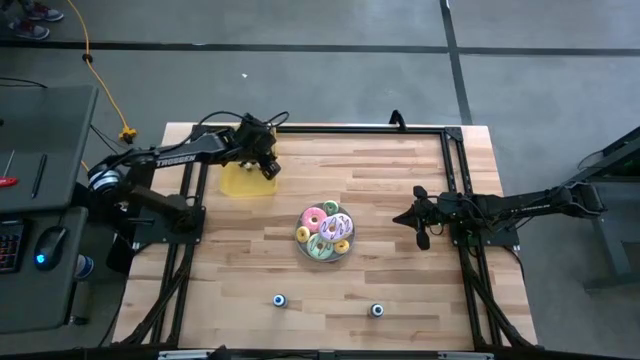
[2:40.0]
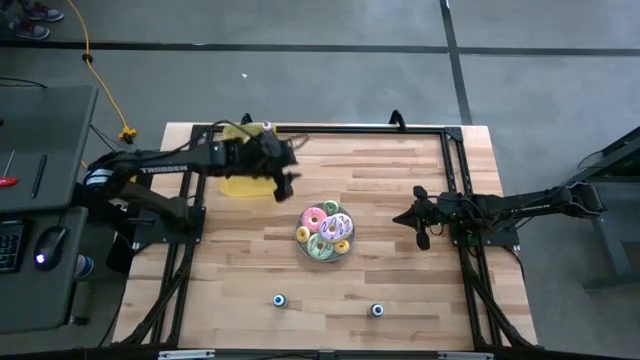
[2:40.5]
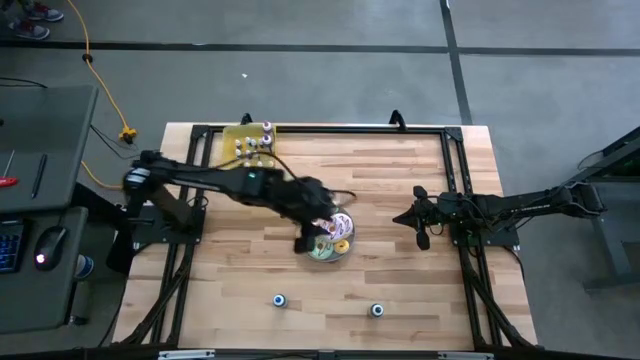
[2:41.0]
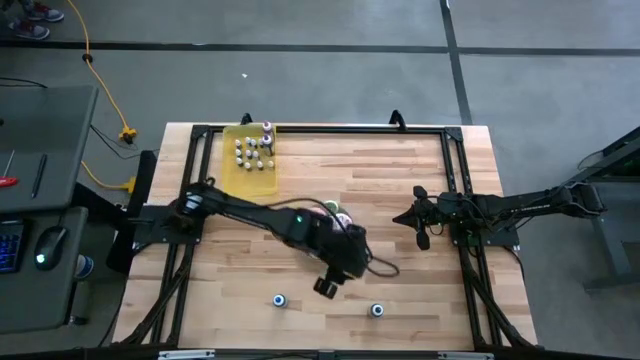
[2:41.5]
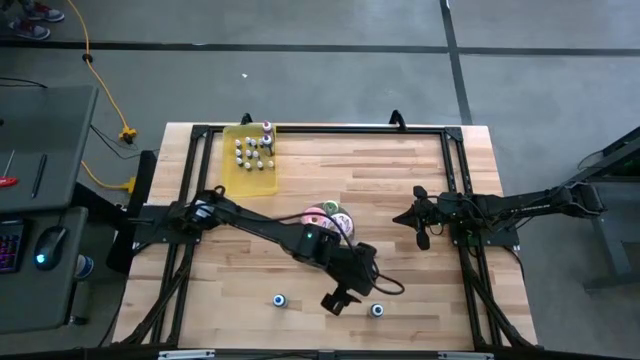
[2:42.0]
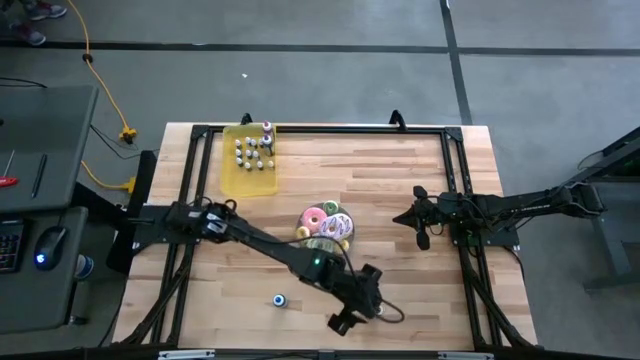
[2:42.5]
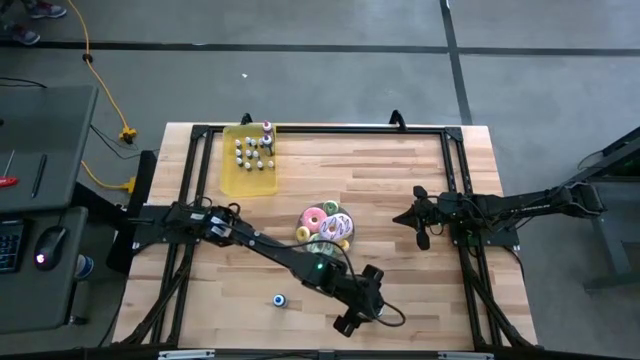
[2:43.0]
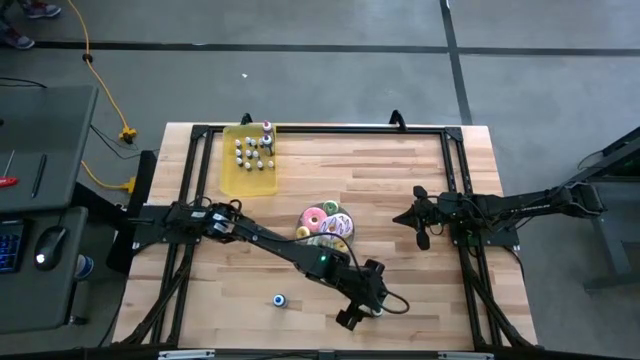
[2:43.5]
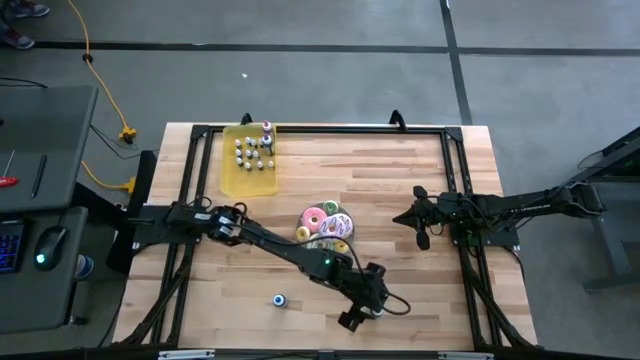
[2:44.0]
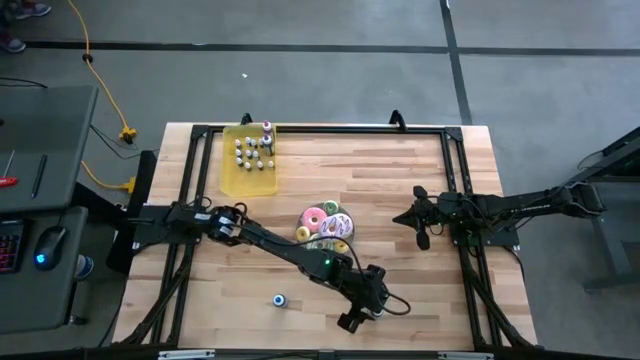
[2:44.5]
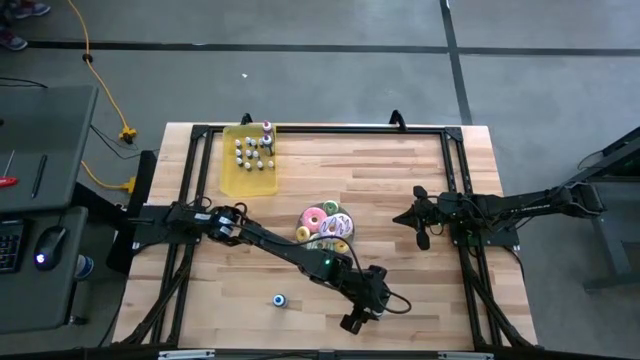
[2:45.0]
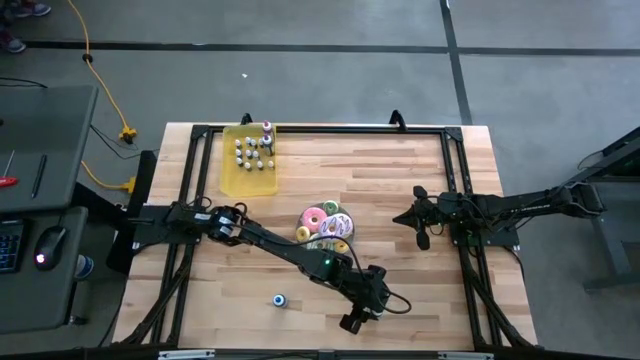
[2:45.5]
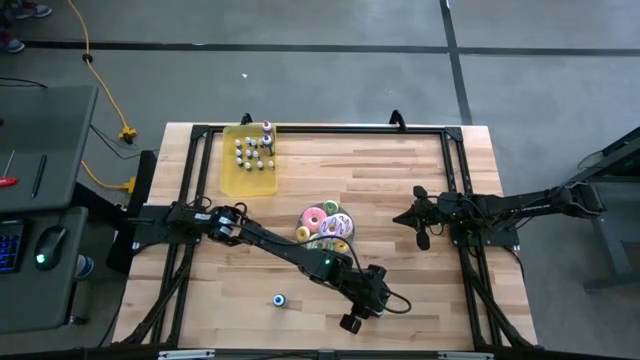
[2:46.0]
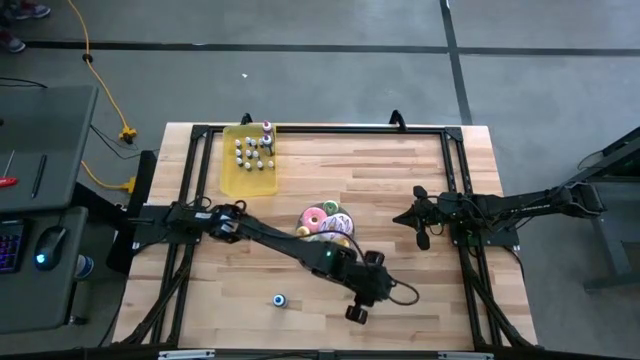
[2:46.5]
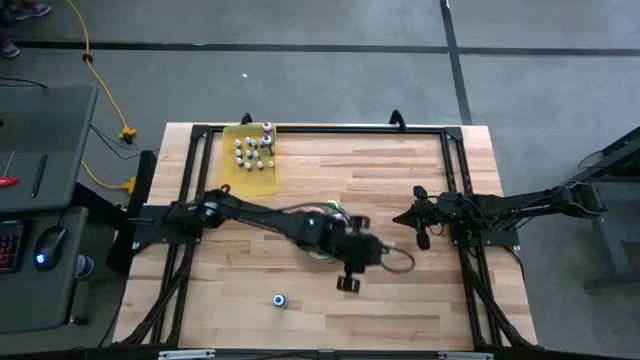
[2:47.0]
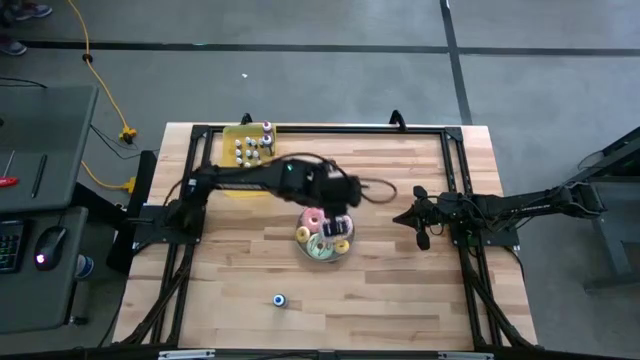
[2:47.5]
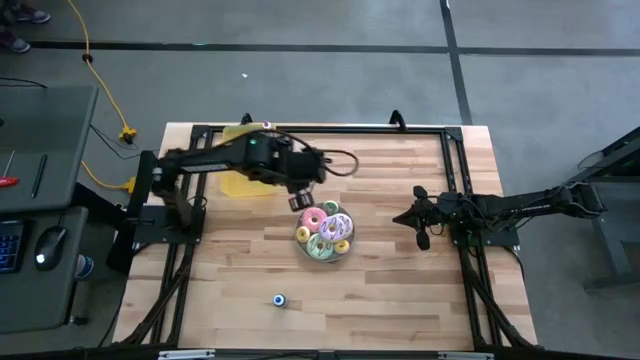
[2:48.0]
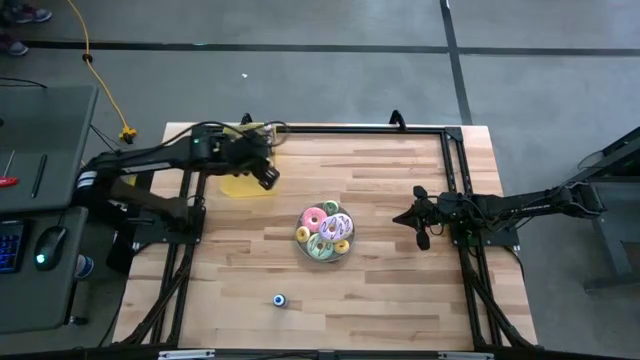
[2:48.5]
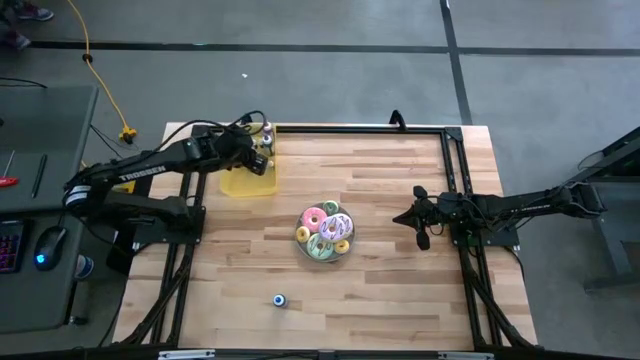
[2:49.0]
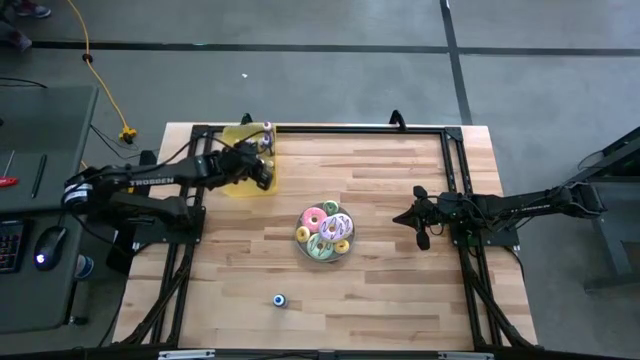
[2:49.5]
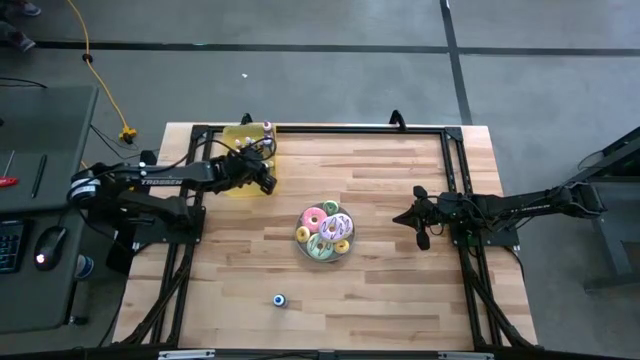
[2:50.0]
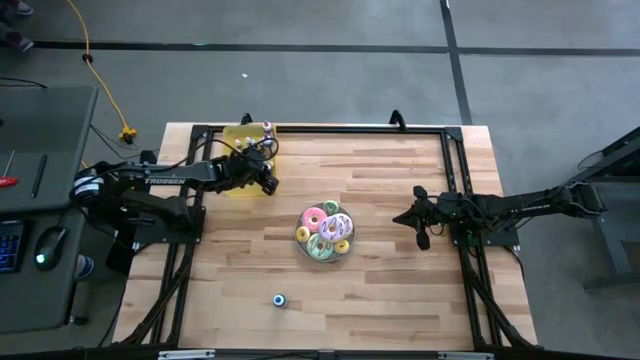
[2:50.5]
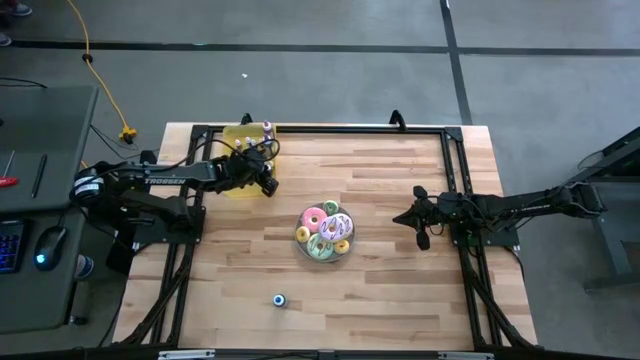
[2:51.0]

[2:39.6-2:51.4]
Task: Pick & Place food coloring
Put the large black food coloring bottle into the yellow bin

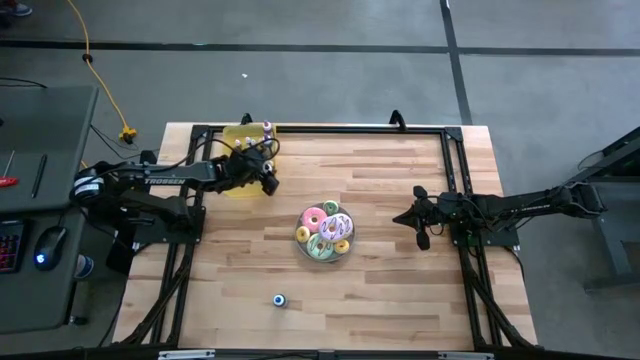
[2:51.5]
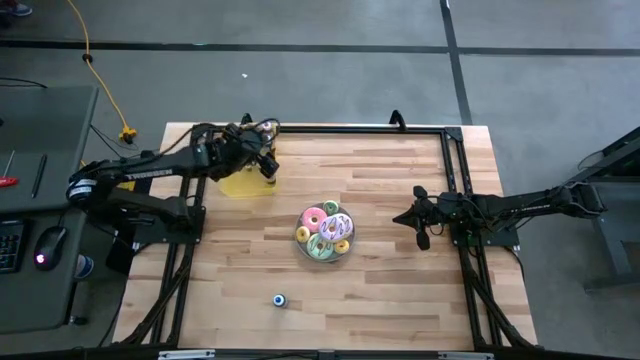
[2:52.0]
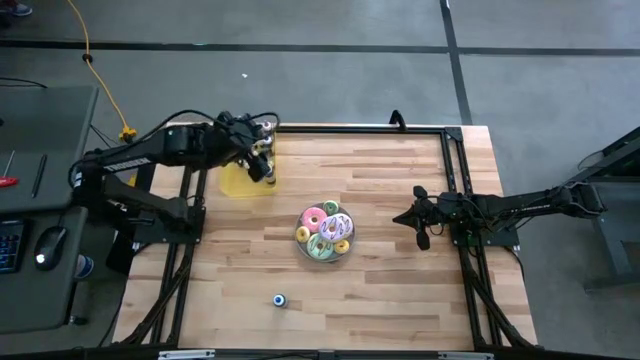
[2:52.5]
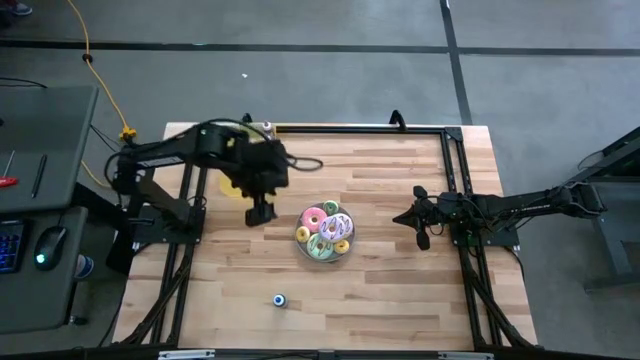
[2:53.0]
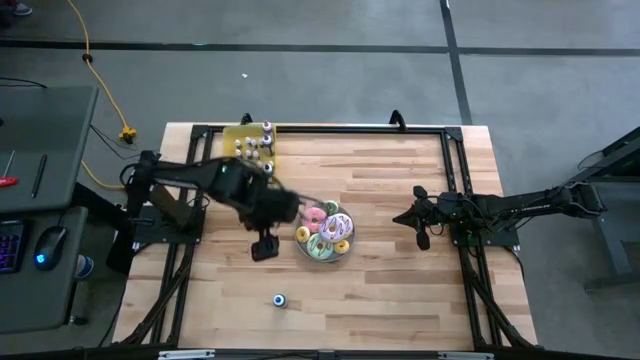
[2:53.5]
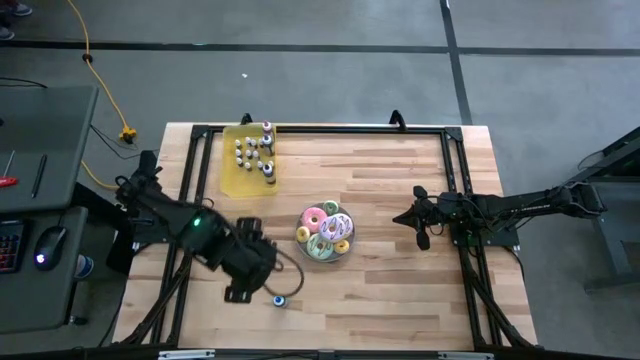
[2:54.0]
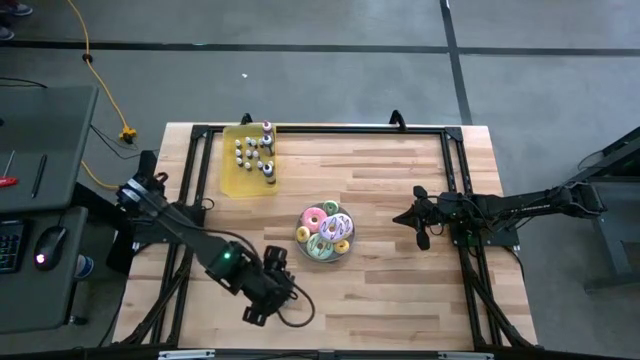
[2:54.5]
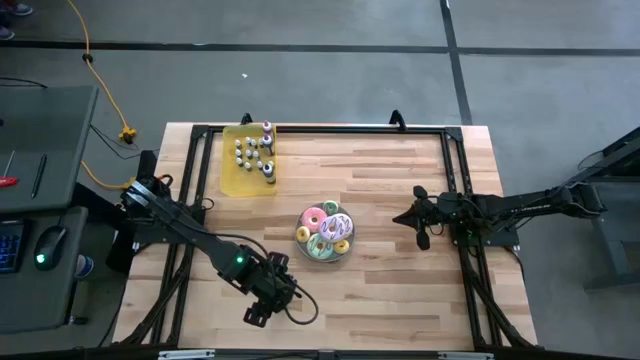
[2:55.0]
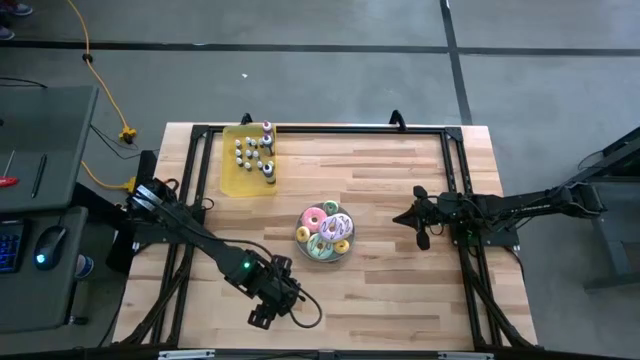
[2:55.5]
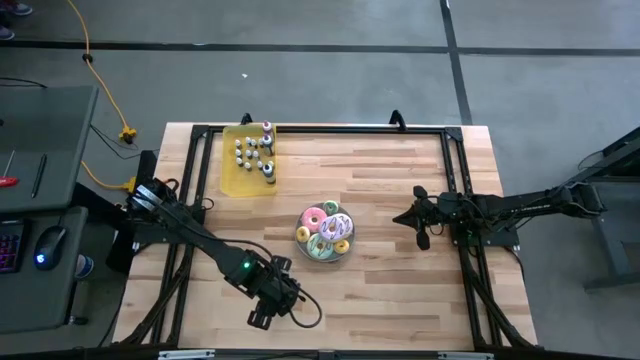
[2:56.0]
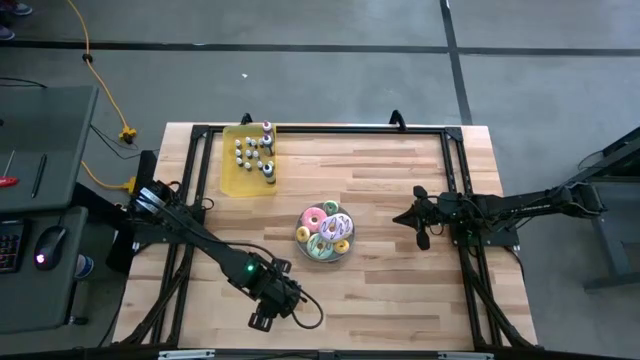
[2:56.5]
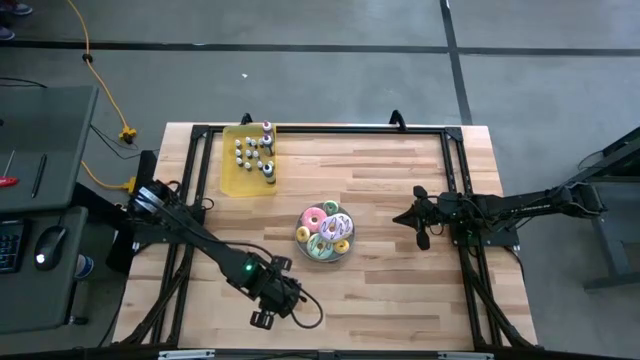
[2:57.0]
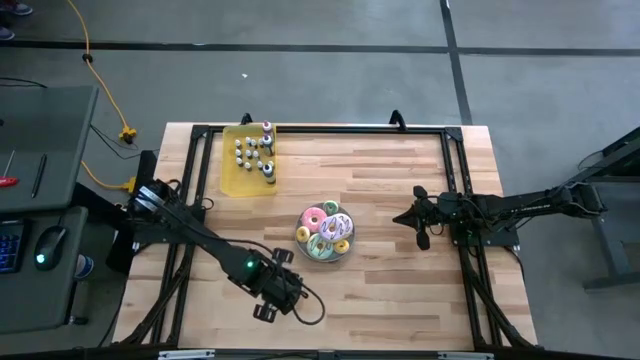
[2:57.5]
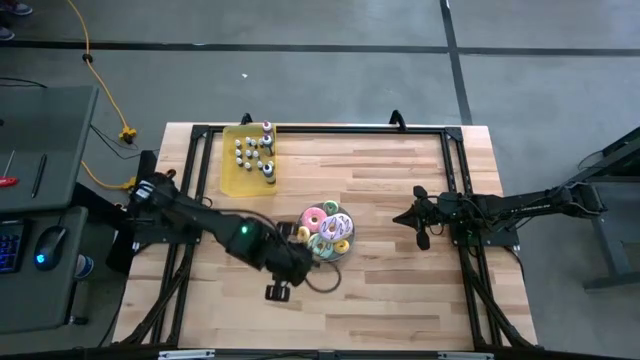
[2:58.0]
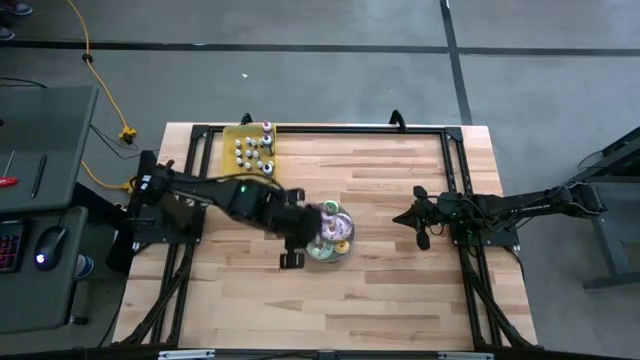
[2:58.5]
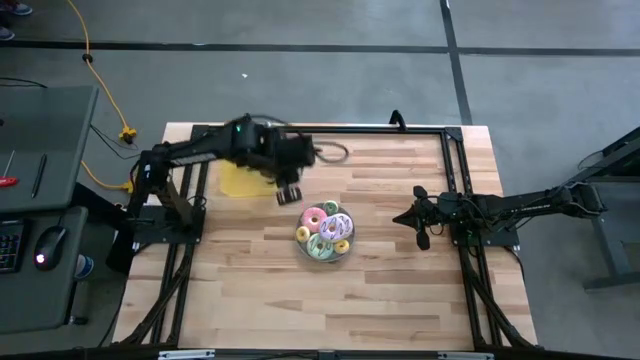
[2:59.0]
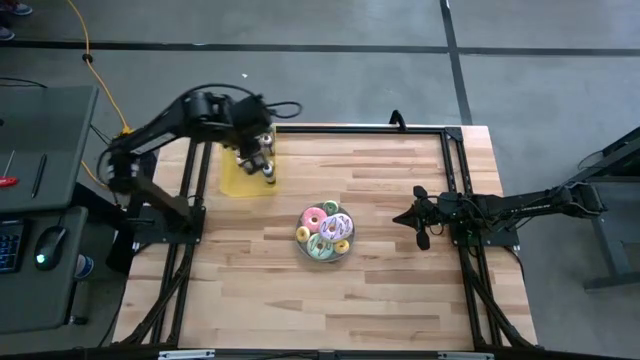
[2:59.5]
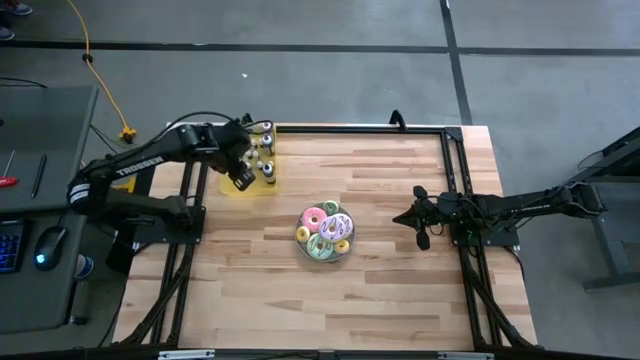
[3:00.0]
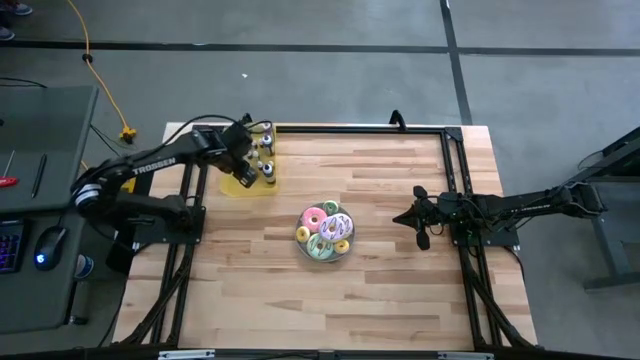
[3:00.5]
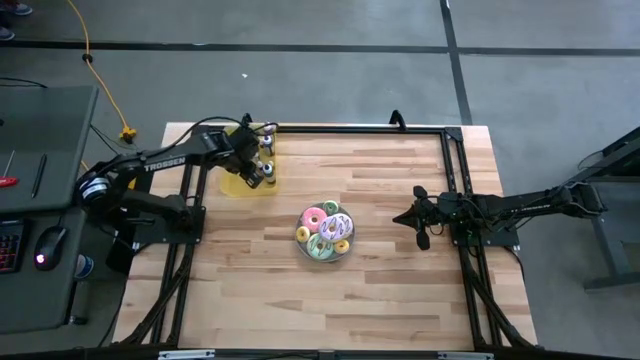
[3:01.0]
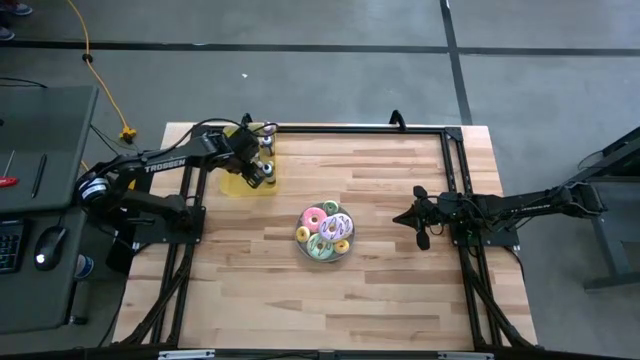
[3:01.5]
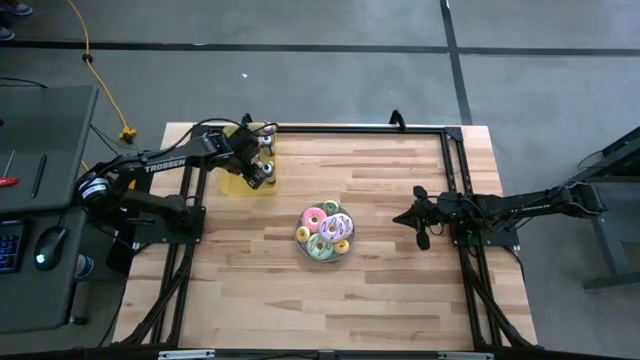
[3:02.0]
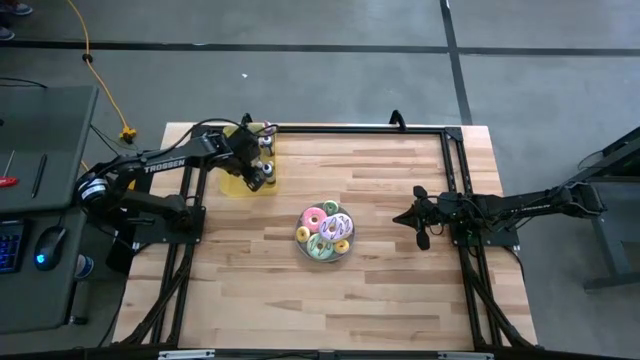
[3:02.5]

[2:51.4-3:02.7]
Put the blue food coloring bottle into the yellow bin
